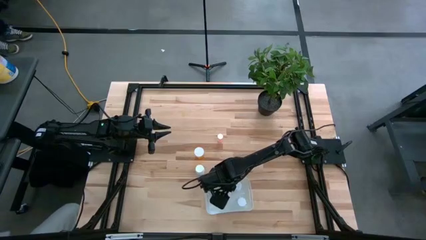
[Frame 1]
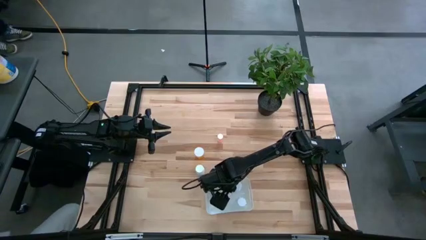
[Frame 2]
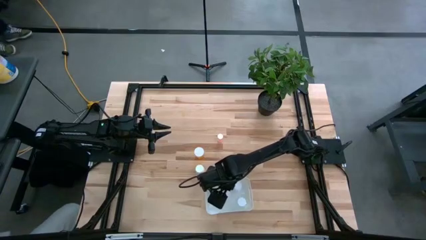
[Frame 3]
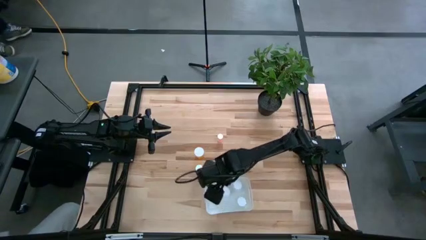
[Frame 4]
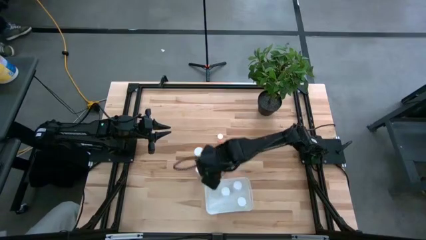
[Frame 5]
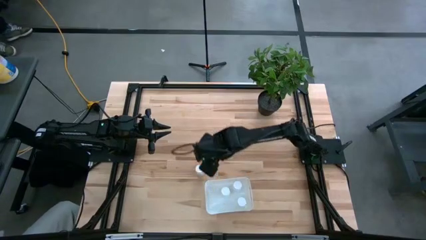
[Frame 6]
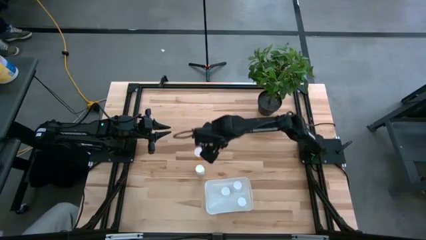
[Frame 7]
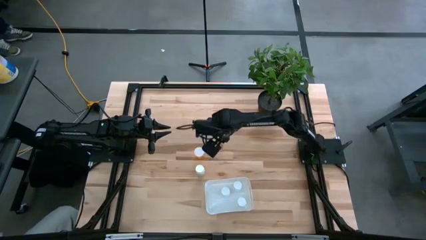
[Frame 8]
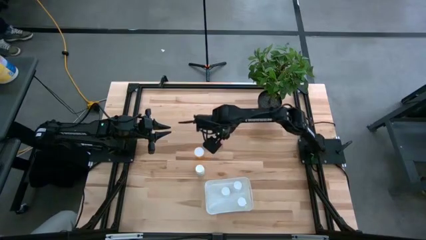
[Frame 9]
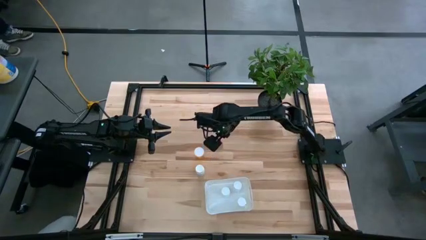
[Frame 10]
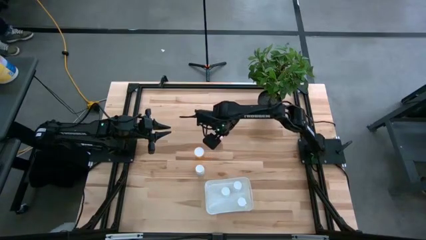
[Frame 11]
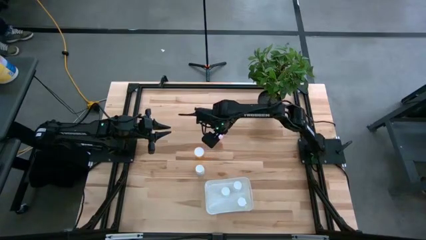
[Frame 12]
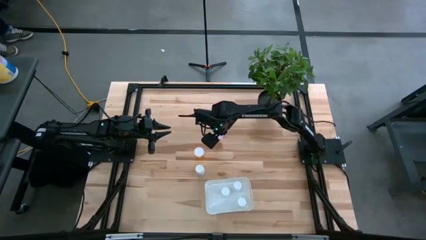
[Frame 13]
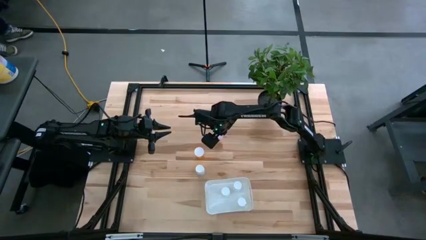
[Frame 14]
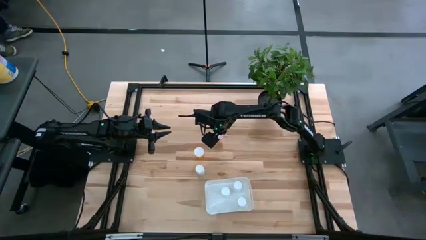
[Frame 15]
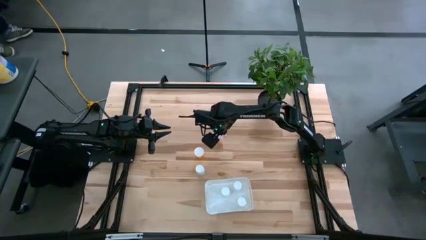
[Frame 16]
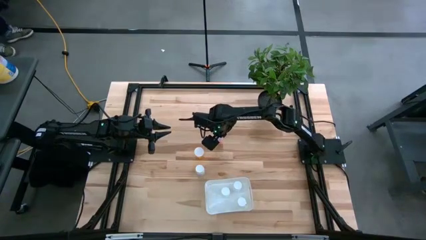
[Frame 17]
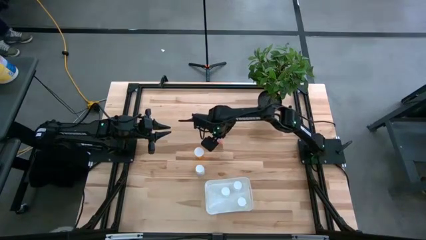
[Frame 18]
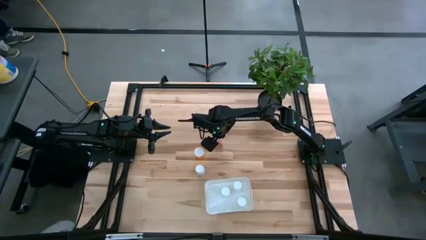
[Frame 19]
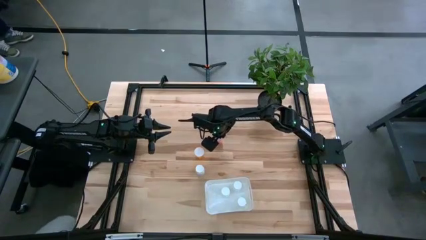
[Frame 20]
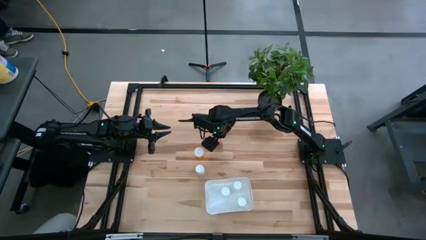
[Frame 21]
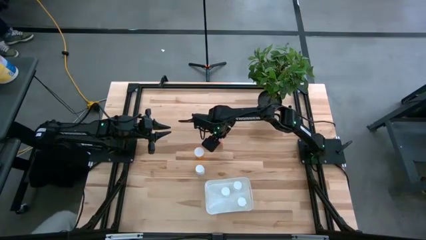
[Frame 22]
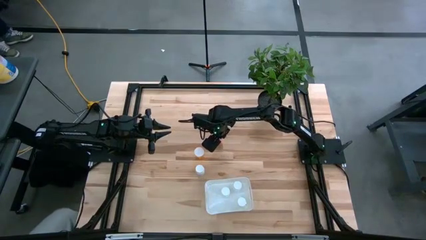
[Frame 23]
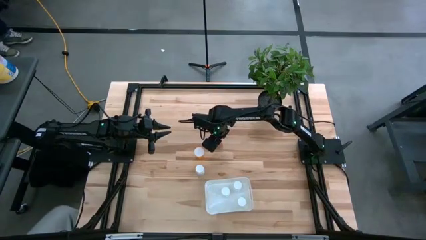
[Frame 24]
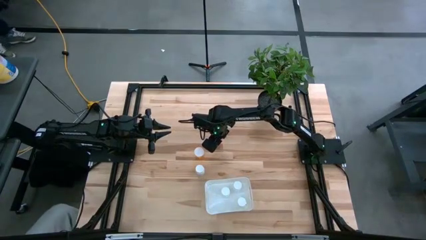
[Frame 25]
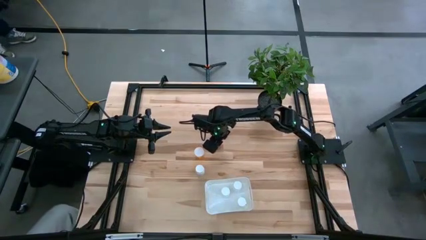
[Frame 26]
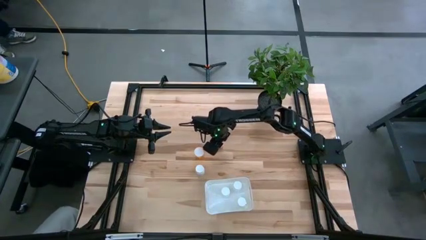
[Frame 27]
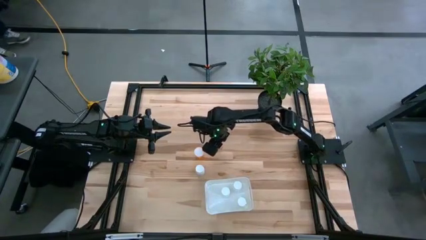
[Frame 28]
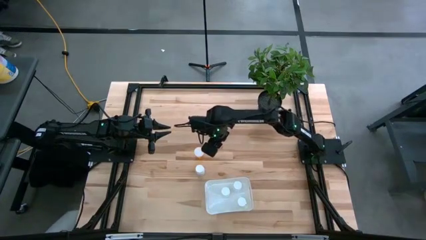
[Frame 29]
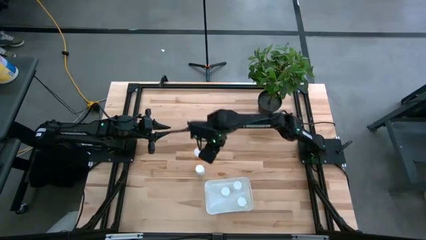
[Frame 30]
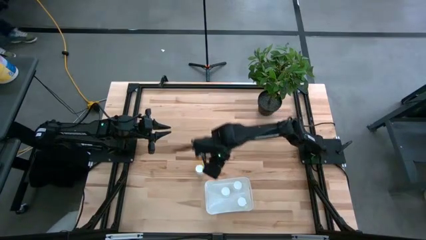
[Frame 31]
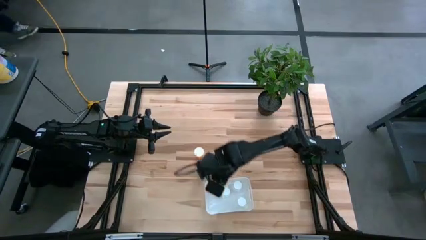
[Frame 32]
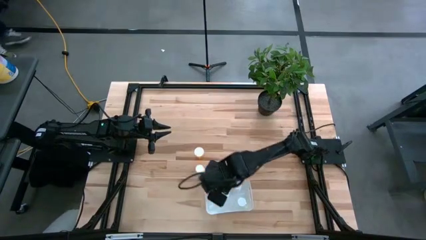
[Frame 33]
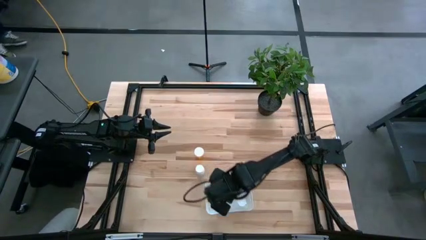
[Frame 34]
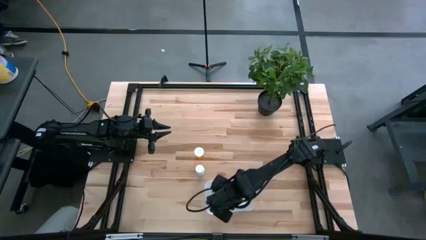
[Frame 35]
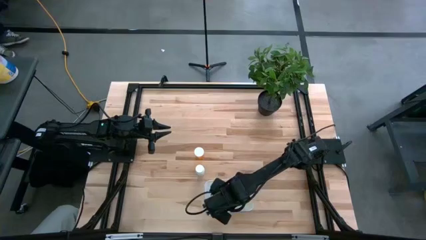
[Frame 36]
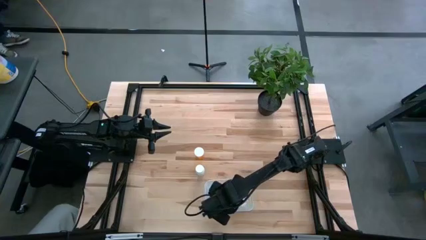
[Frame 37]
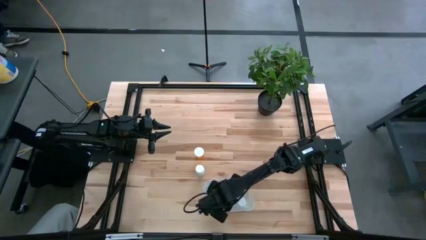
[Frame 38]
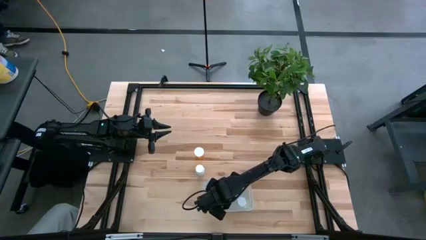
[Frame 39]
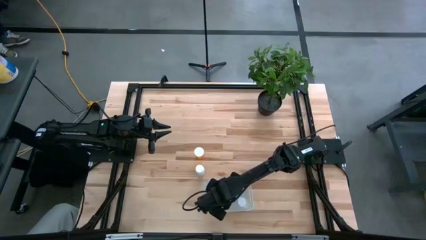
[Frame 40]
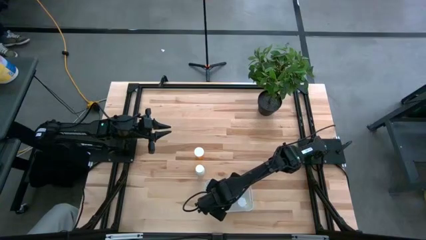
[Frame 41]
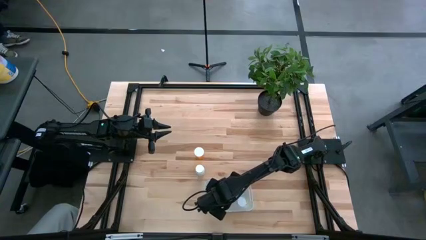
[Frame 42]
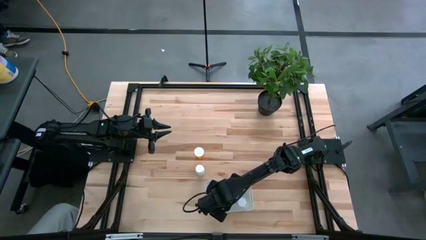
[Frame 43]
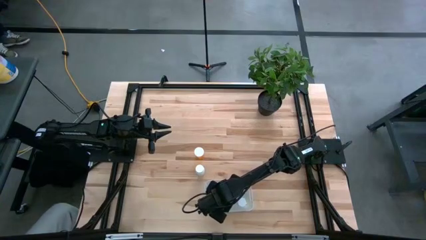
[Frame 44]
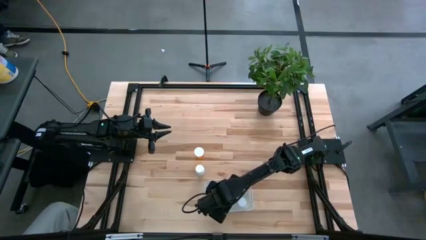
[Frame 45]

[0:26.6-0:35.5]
Task: Pick and place pill bottles into a basket
Put the pink pill bottle into the white bin

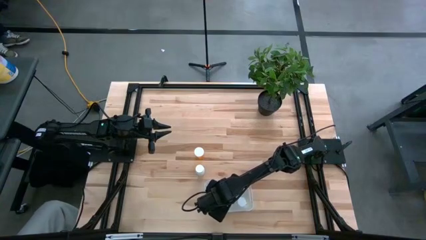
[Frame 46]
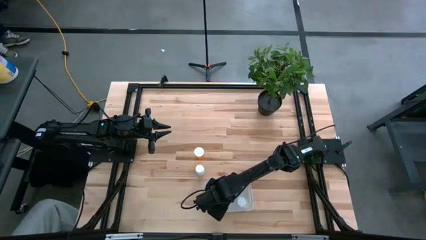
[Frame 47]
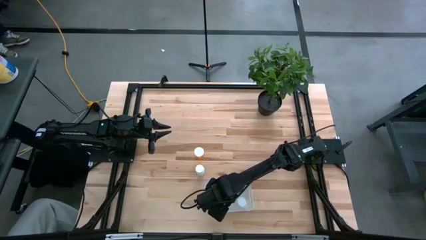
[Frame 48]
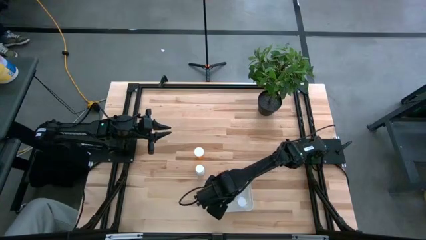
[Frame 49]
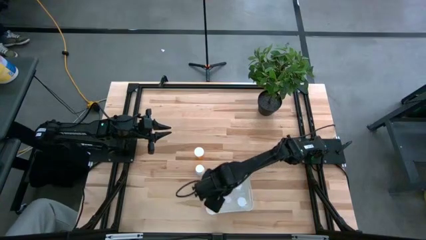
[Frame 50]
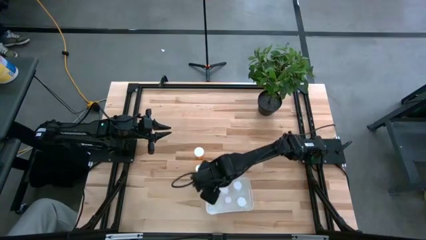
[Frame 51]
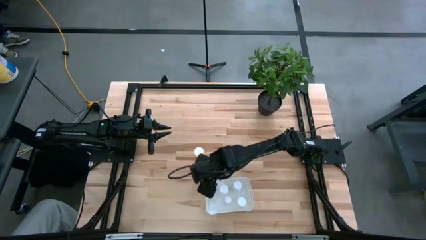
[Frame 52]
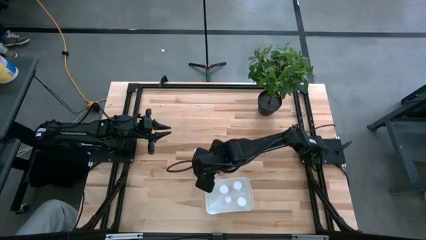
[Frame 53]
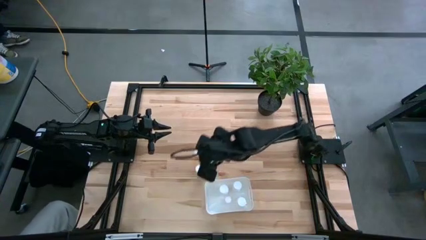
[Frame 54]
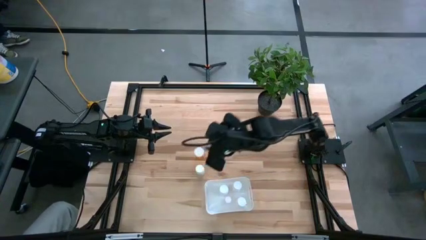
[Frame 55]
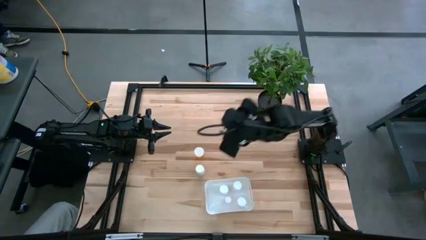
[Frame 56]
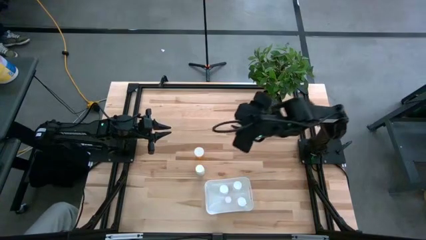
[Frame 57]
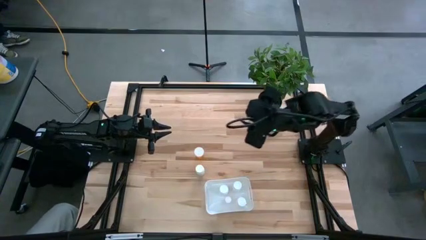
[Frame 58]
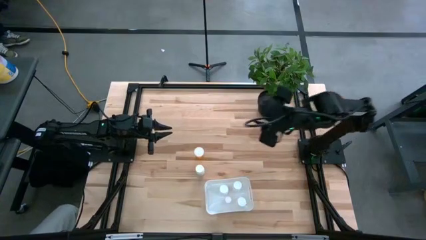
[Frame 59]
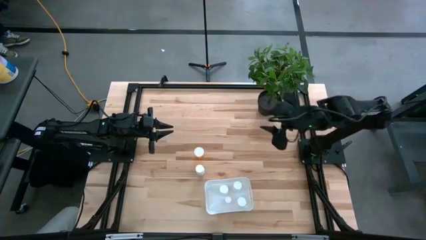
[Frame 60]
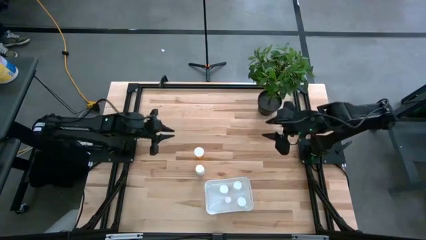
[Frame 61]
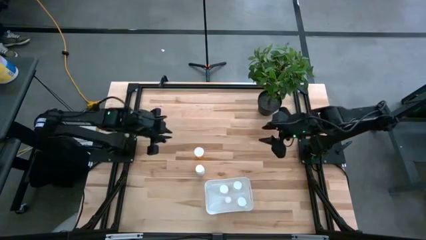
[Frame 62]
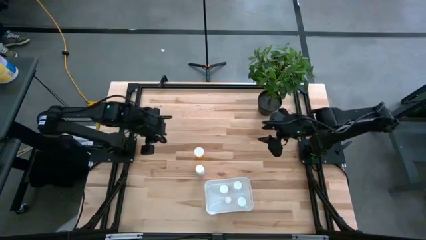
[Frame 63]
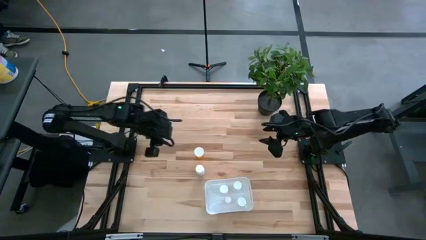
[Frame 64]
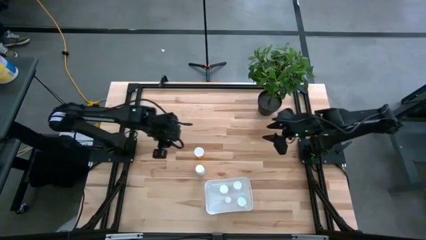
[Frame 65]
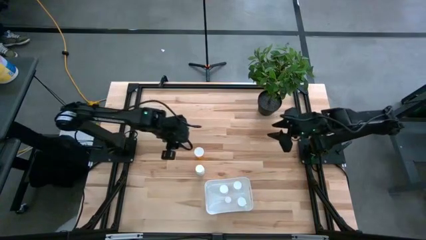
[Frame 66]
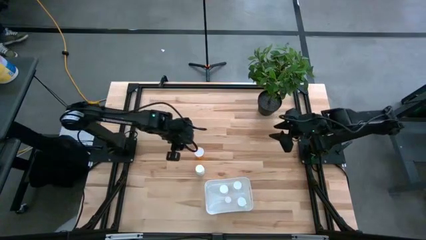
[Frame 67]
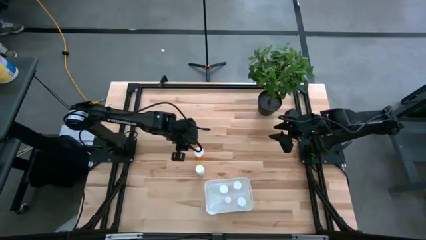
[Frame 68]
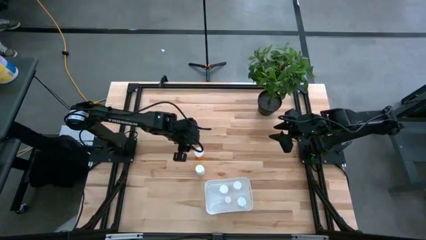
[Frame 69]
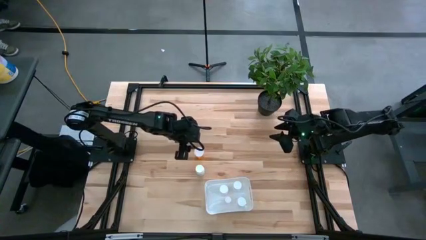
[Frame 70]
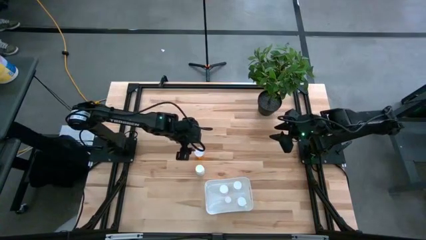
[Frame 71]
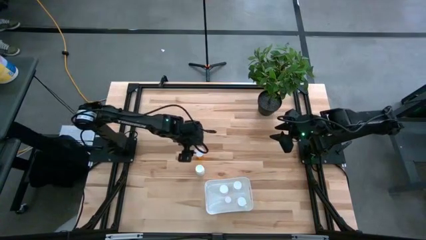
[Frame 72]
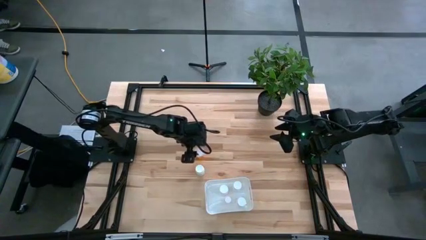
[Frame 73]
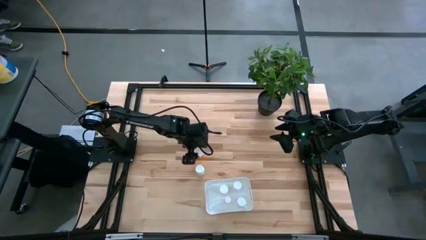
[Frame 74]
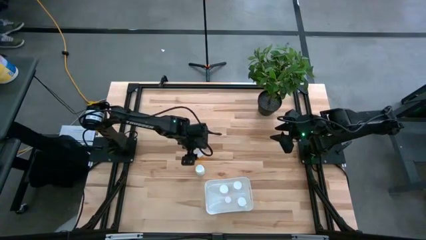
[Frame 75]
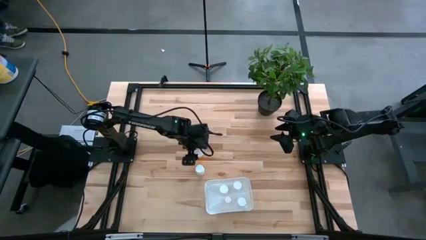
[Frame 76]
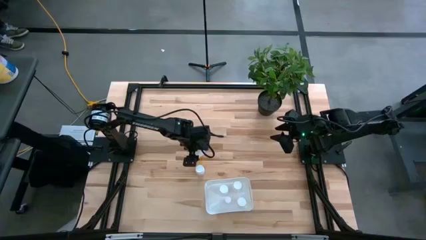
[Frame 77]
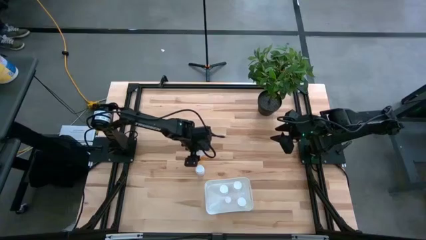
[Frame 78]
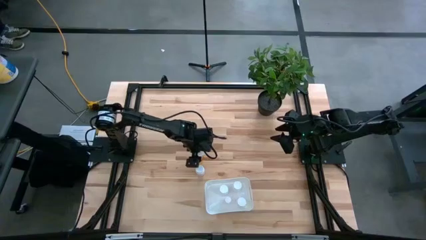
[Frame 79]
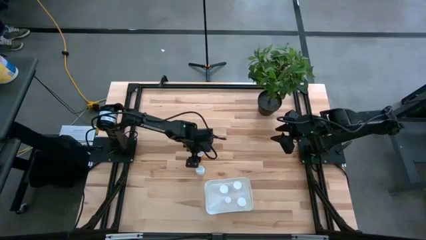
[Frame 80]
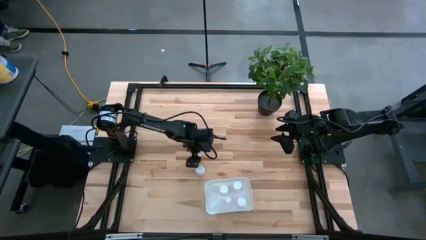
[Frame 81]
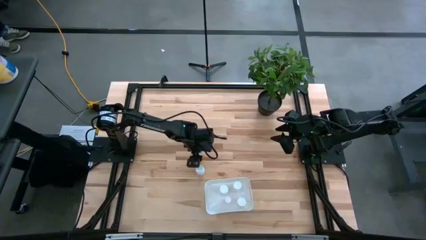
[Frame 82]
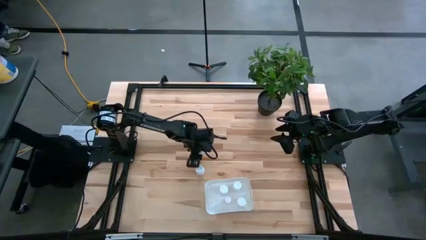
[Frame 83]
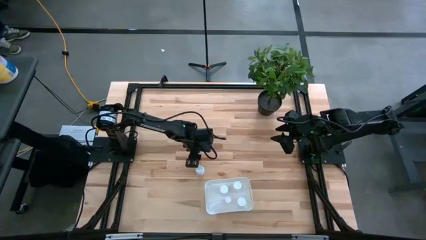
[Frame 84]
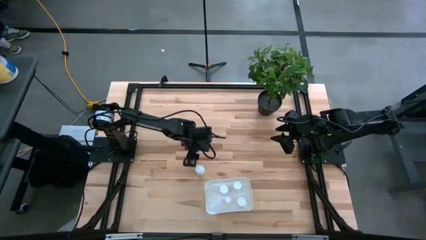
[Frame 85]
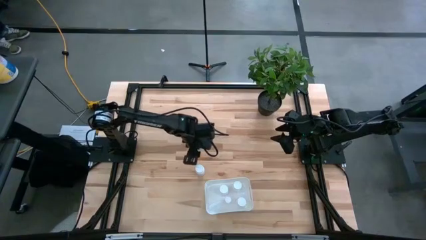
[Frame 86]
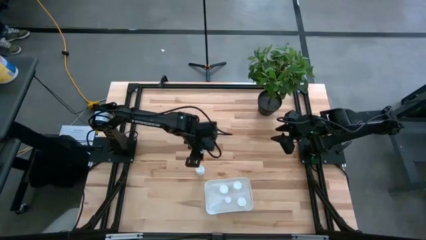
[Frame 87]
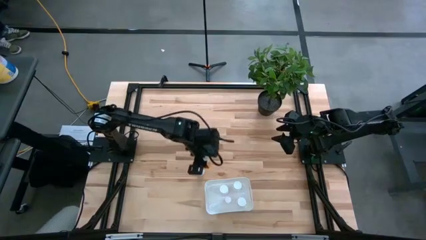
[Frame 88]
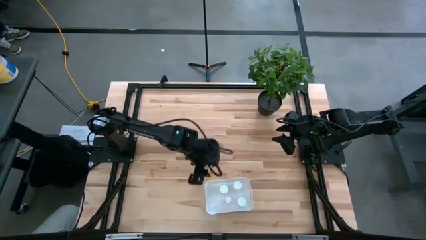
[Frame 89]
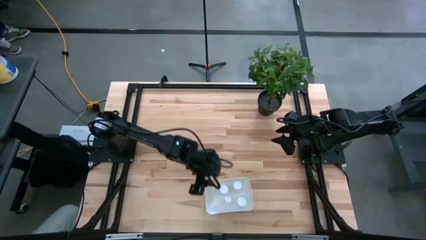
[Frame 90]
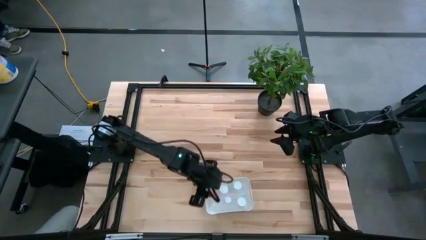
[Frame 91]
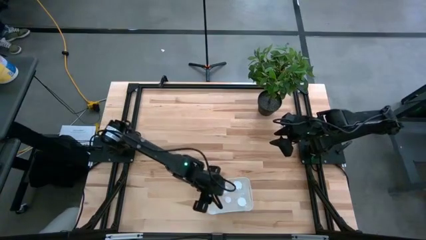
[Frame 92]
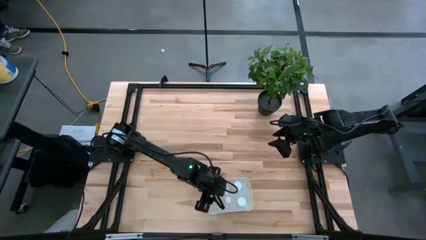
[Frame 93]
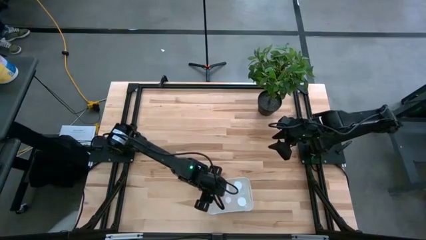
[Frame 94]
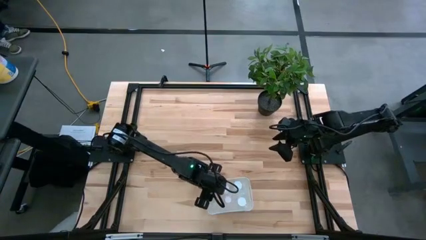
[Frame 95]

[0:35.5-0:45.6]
Put the orange pill bottle into the white bin
